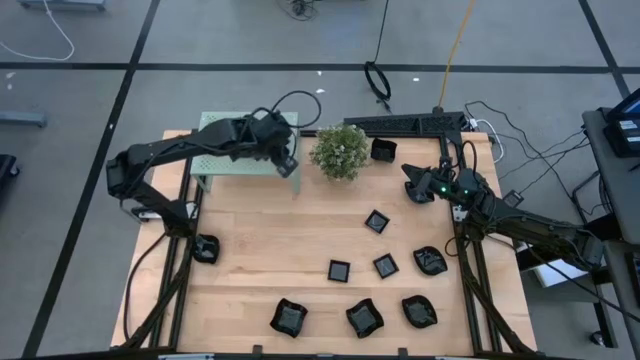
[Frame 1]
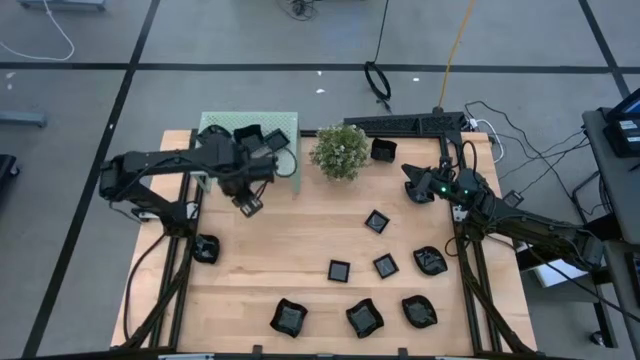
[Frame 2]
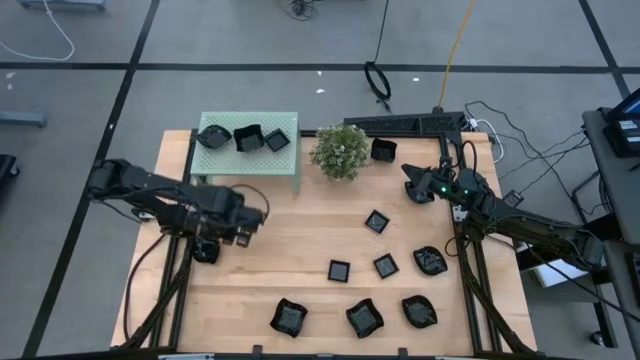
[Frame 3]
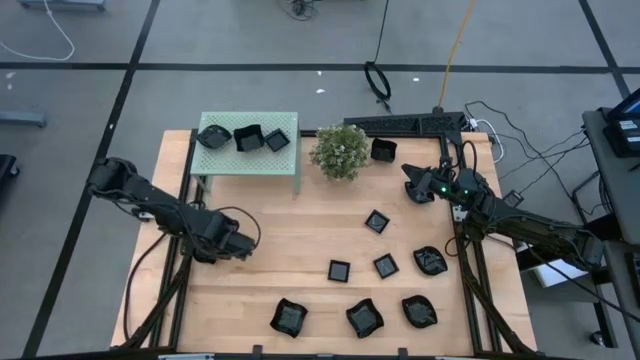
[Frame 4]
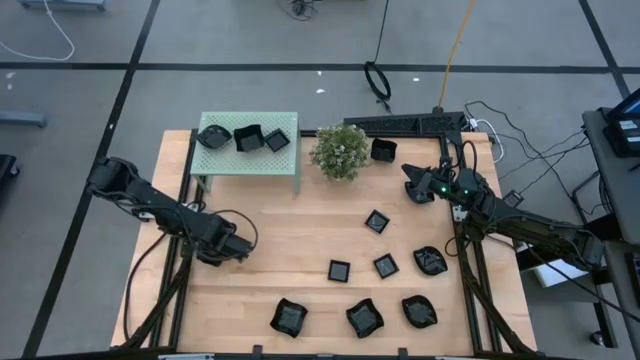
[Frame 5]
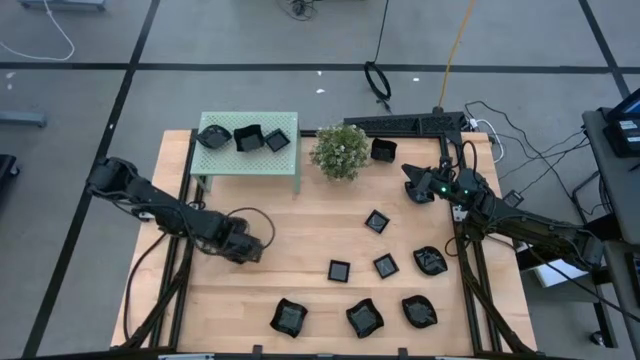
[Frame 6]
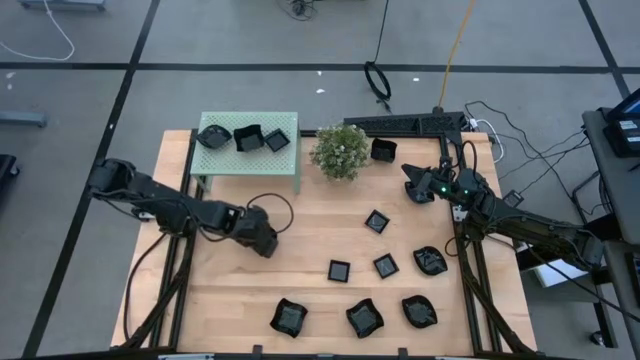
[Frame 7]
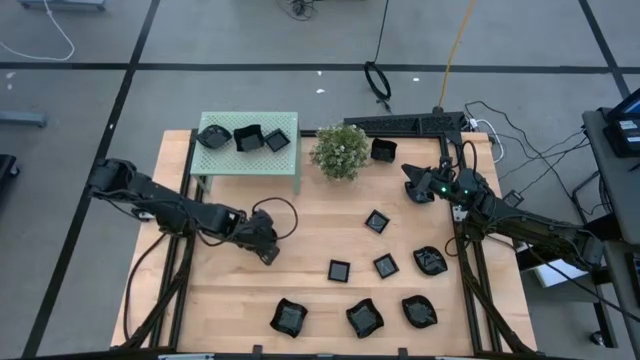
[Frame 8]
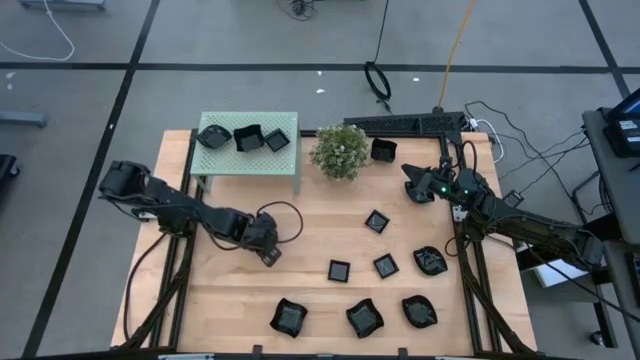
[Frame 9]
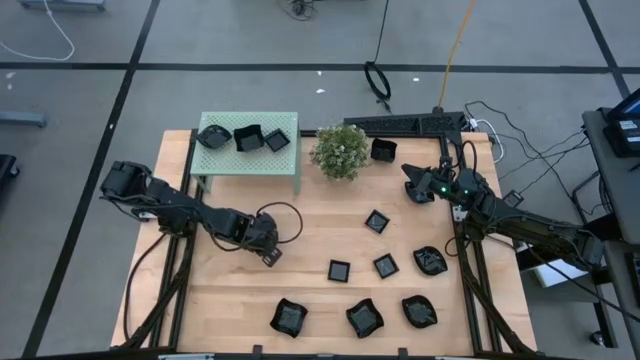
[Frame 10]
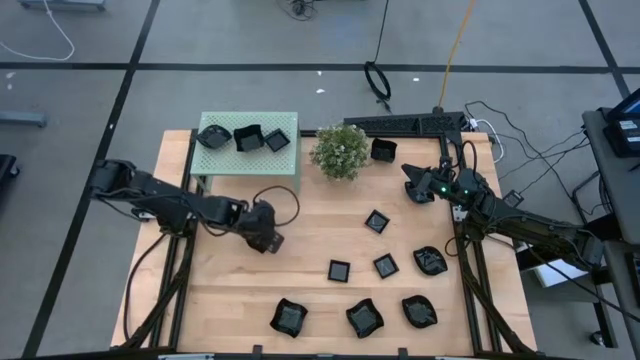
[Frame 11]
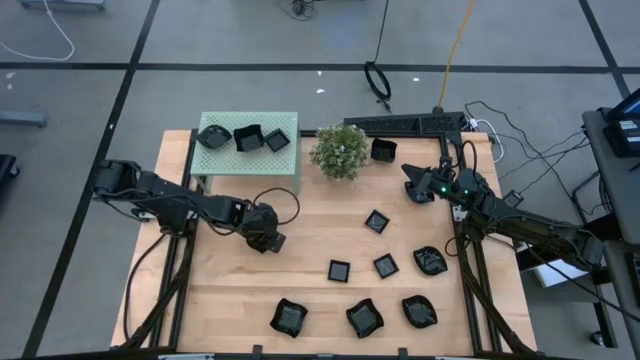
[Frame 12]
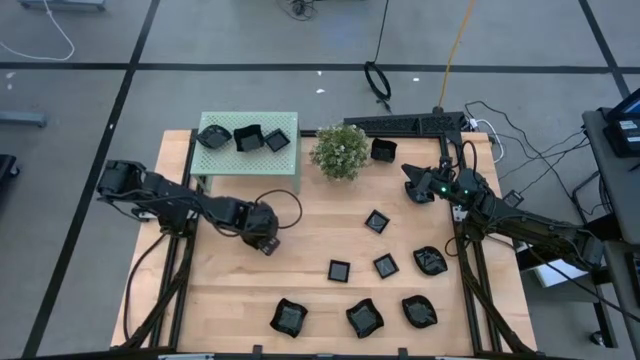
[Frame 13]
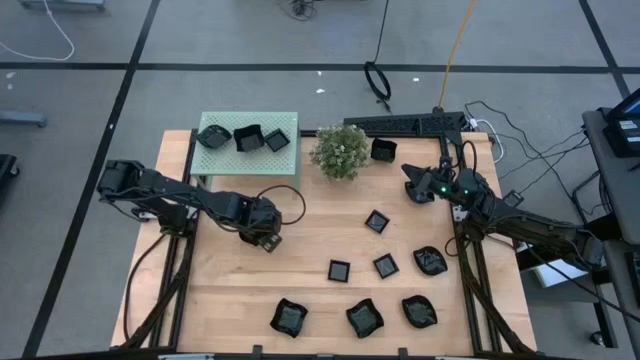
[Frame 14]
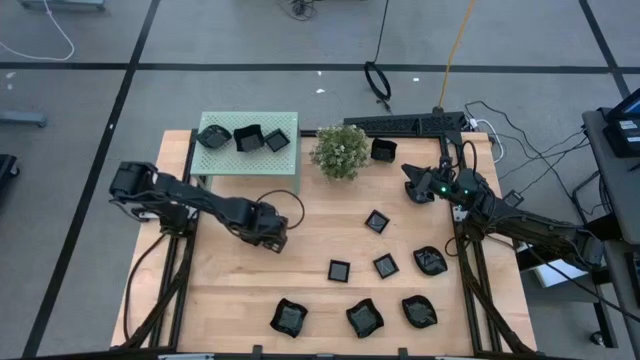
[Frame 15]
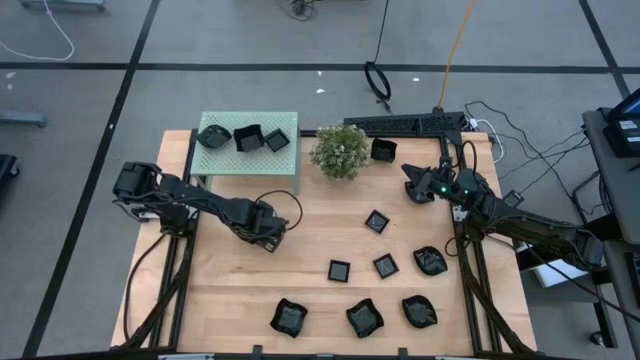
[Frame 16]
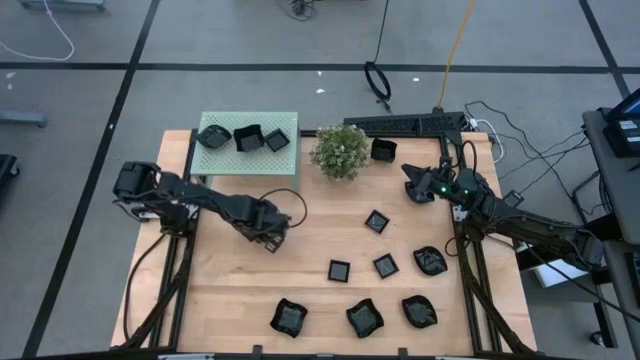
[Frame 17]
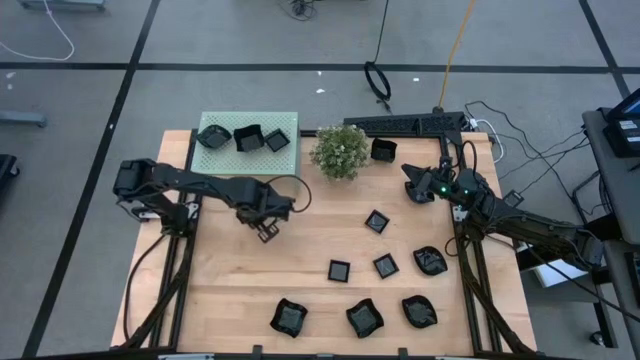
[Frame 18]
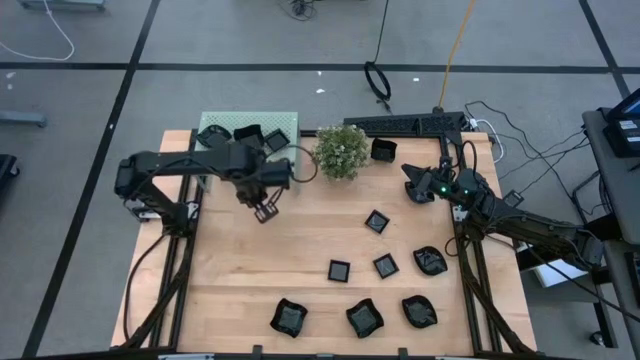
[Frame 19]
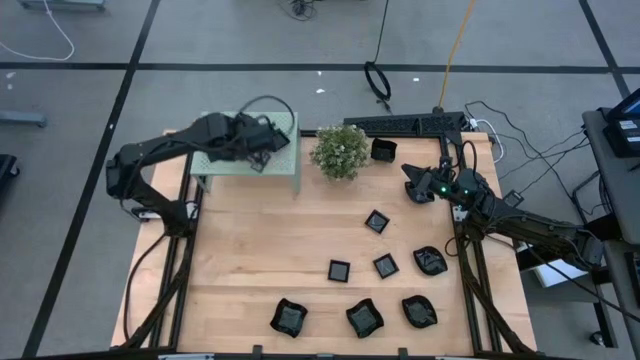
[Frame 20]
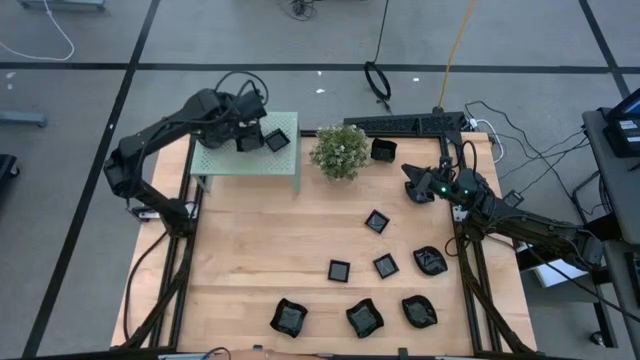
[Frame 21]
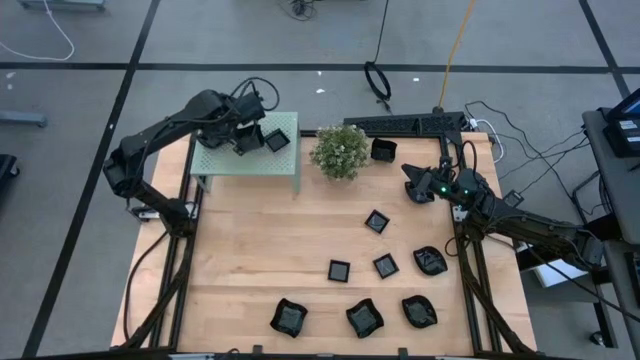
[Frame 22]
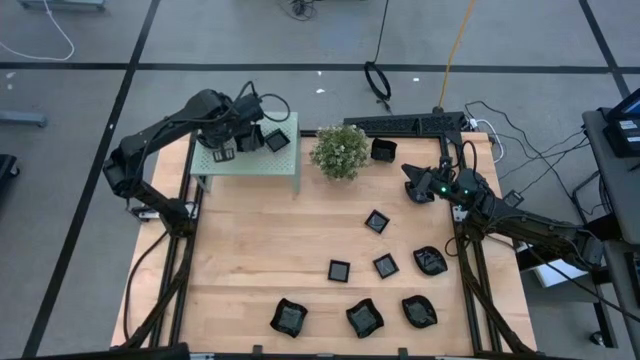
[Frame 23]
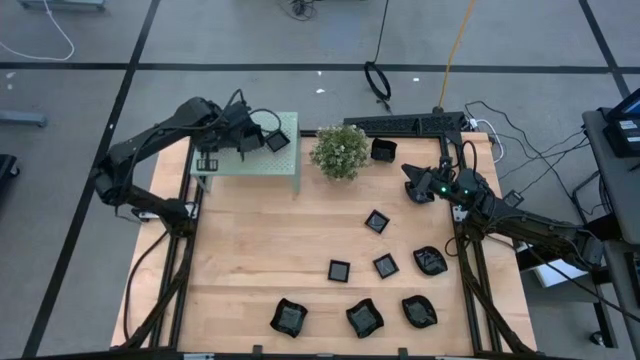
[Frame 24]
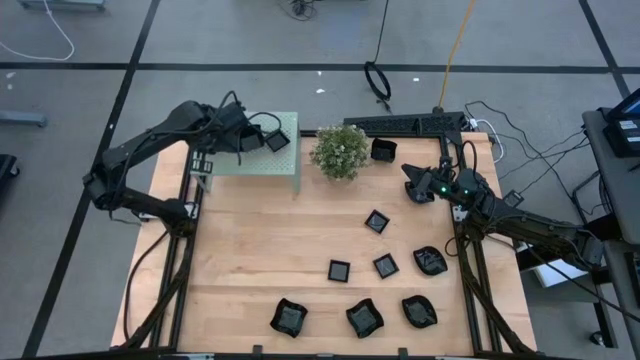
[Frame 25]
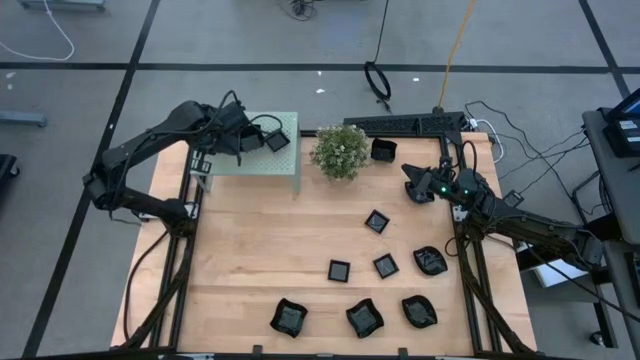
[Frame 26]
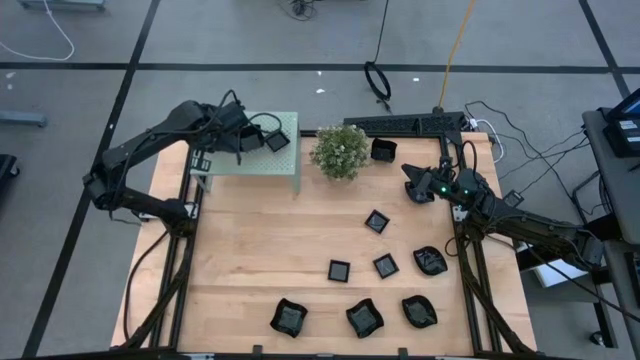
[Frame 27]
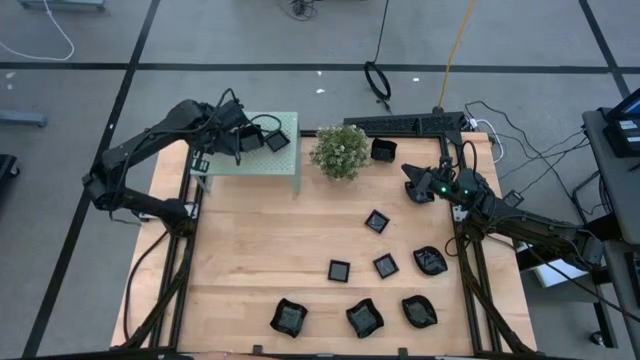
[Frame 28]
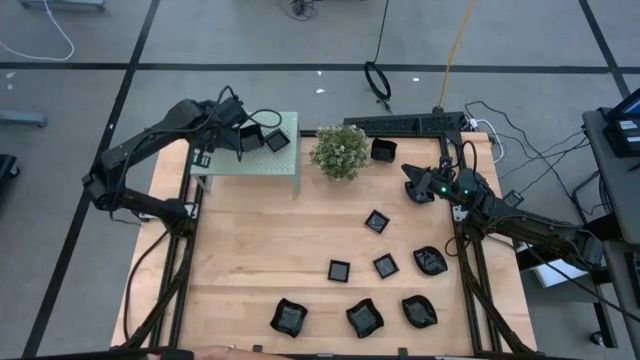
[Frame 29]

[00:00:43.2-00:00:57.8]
Task: Pick & Place Mini shaped plates
Stack the leaf shape plate on top of the leaf shape plate on the shelf

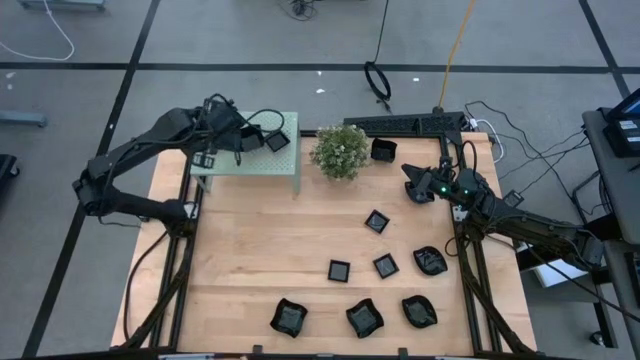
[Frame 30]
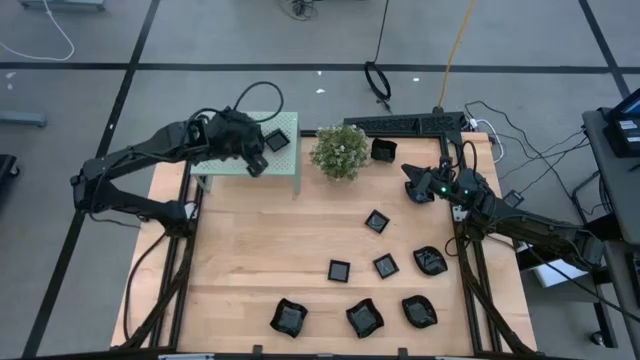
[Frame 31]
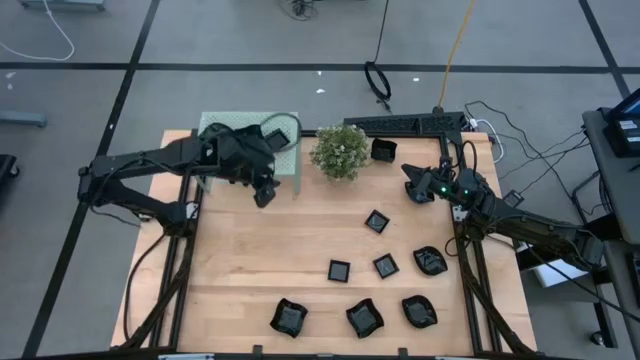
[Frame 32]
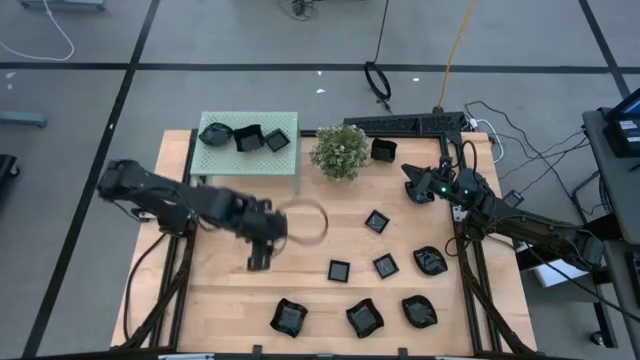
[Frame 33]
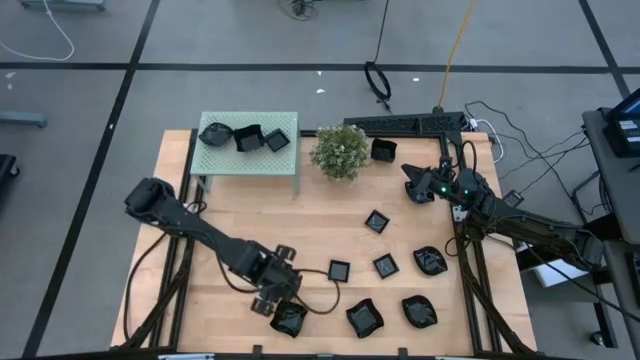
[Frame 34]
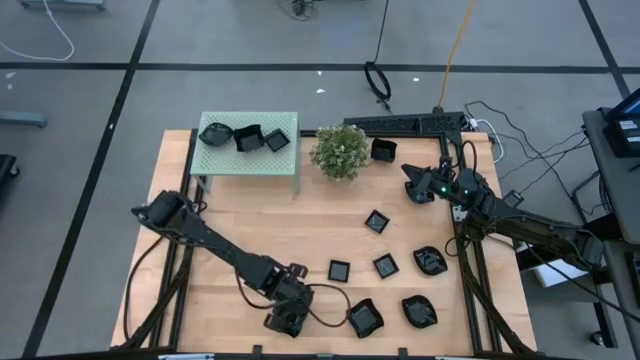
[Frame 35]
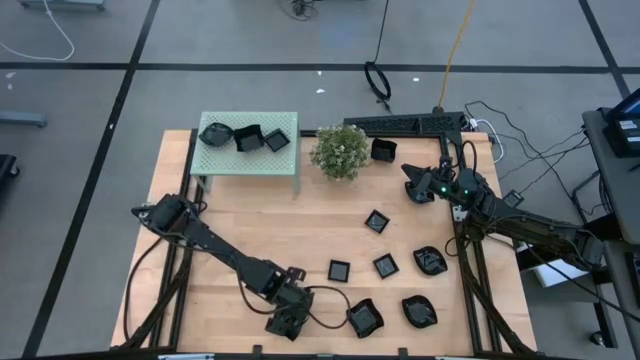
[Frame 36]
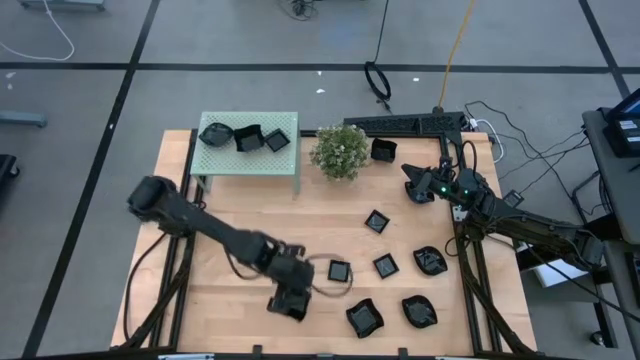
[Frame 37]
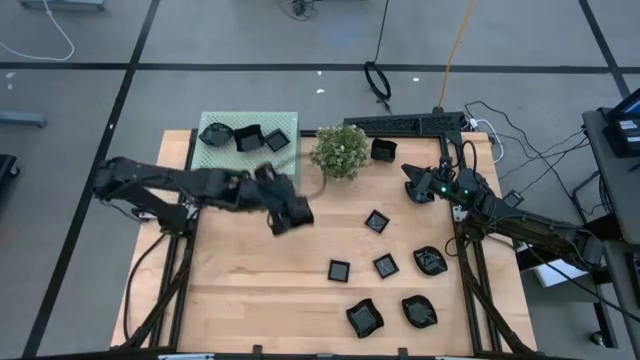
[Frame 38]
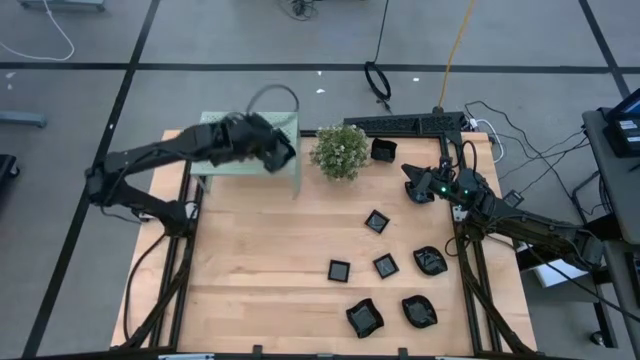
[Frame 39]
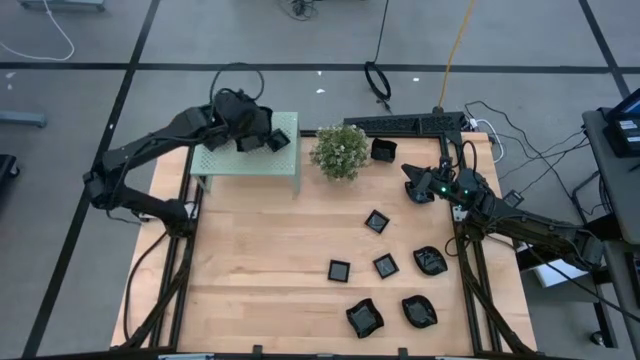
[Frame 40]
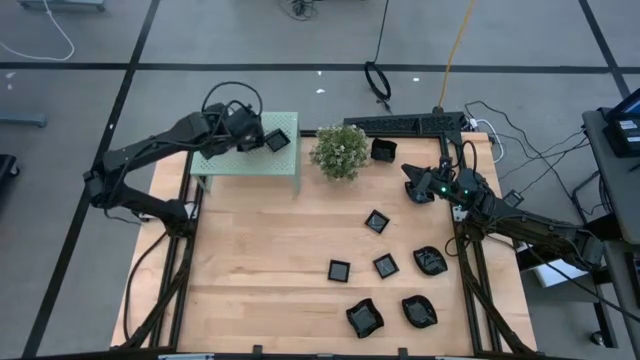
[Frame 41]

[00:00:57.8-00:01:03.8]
Stack the distorted square plate on top of the distorted square plate on the shelf

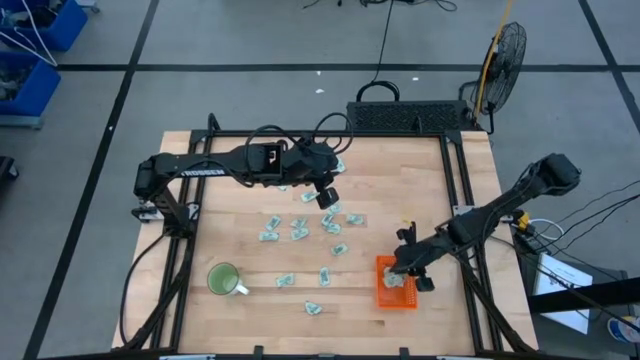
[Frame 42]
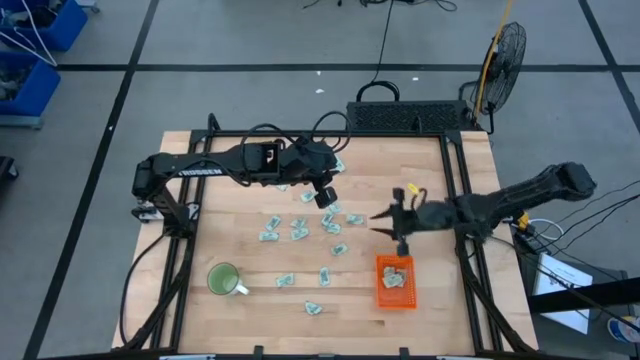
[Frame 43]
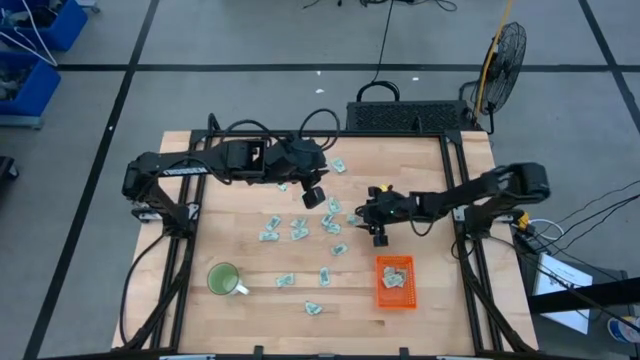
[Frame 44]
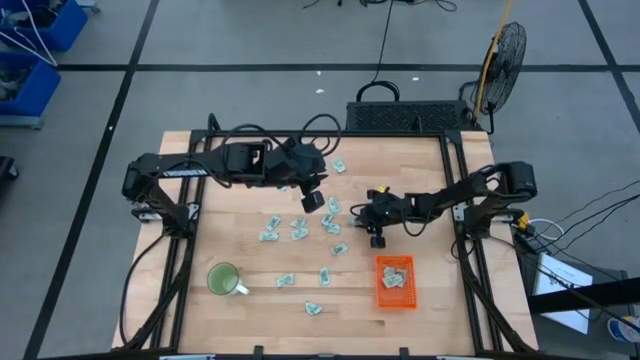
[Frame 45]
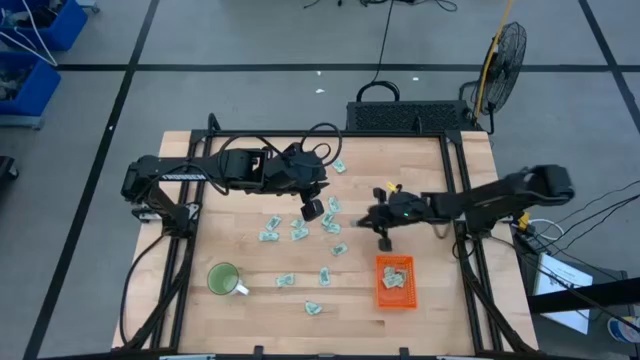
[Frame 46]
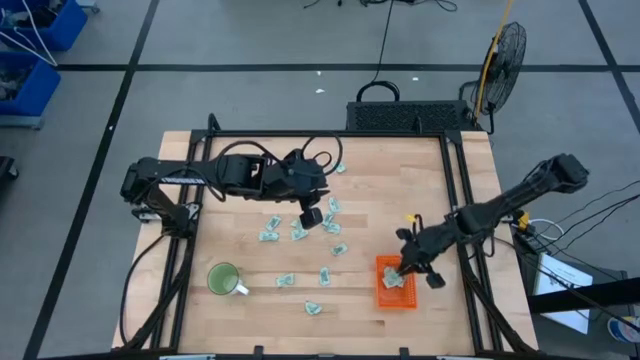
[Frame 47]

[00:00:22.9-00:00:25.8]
Task: Pick and place Stevia / Truvia into bins
Put the stevia packet into the orange basket
